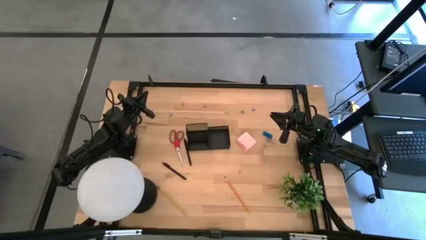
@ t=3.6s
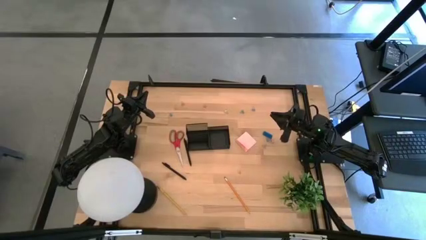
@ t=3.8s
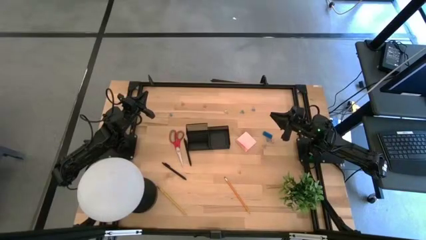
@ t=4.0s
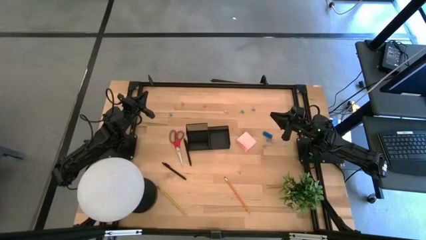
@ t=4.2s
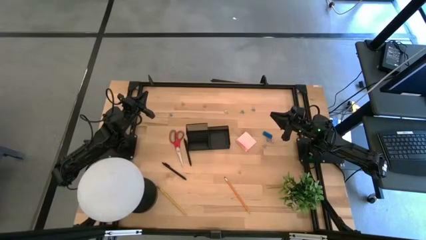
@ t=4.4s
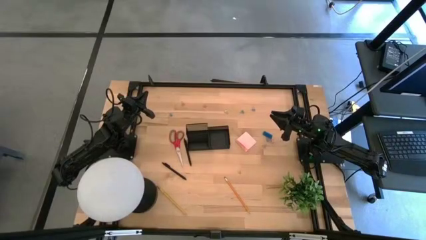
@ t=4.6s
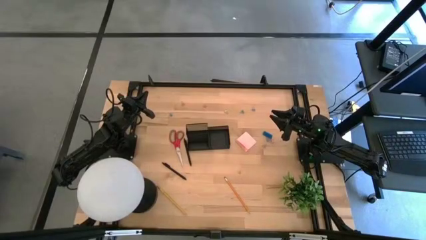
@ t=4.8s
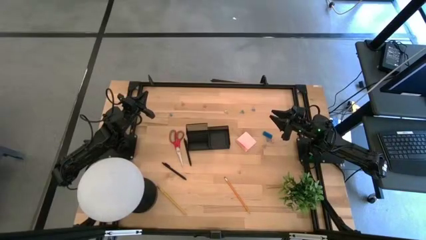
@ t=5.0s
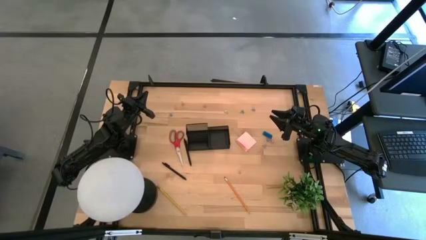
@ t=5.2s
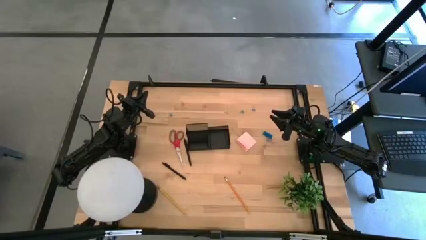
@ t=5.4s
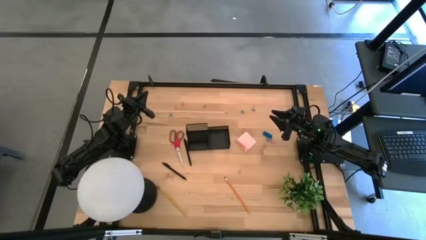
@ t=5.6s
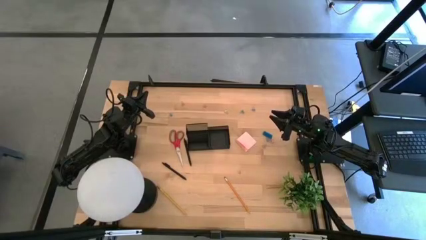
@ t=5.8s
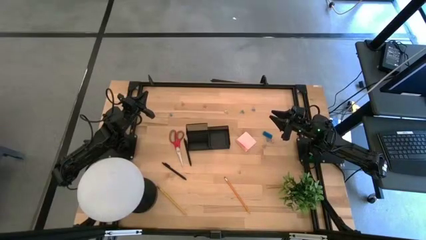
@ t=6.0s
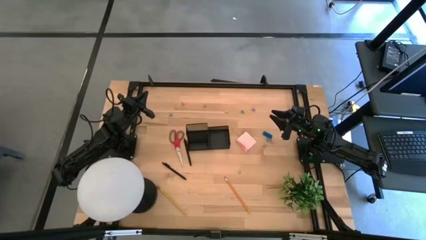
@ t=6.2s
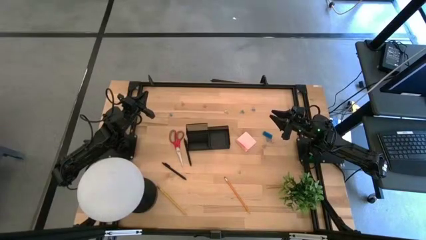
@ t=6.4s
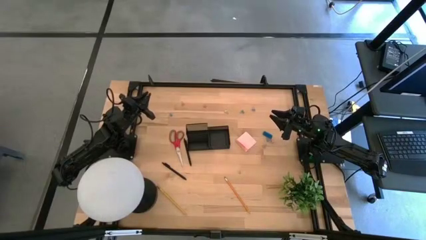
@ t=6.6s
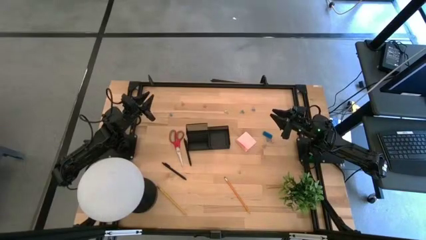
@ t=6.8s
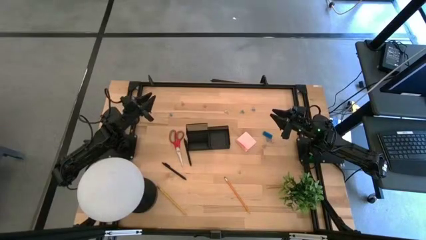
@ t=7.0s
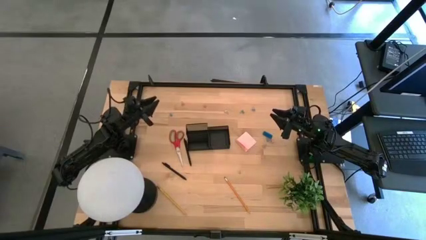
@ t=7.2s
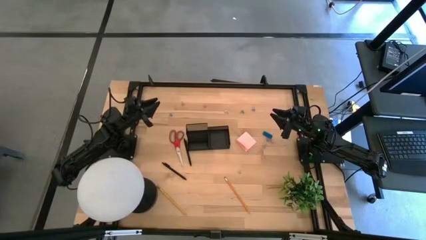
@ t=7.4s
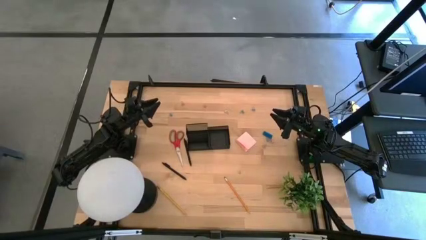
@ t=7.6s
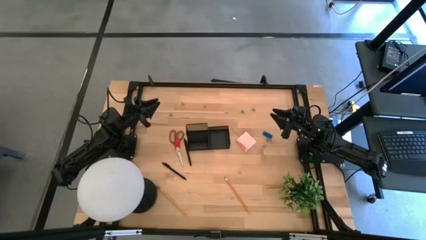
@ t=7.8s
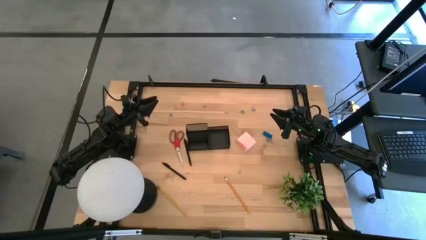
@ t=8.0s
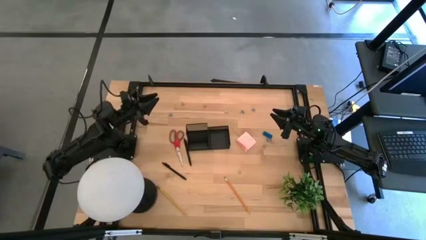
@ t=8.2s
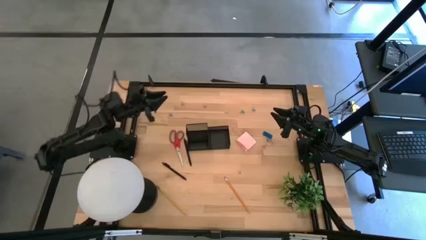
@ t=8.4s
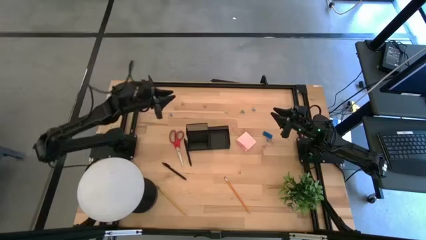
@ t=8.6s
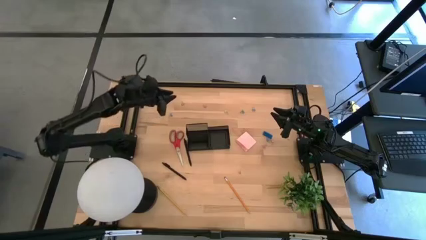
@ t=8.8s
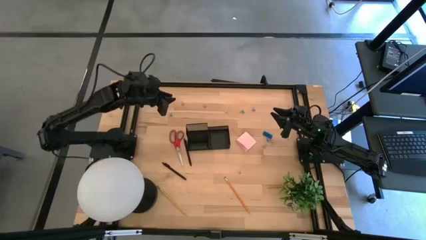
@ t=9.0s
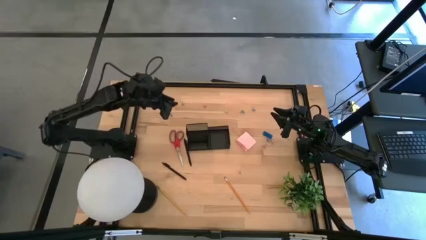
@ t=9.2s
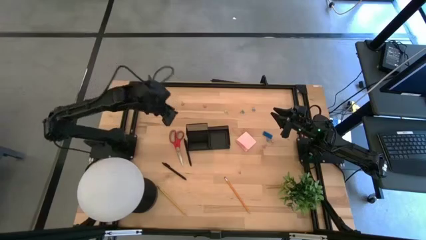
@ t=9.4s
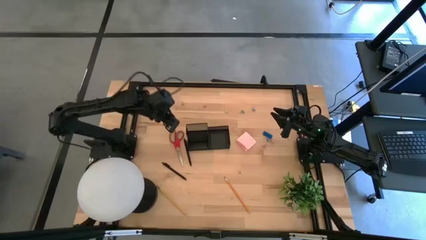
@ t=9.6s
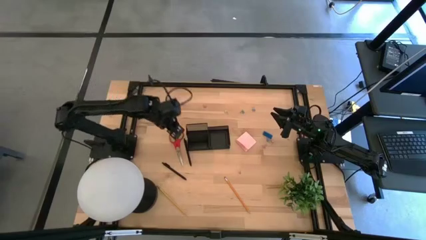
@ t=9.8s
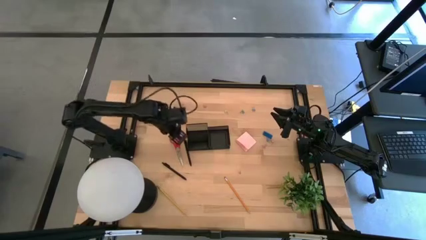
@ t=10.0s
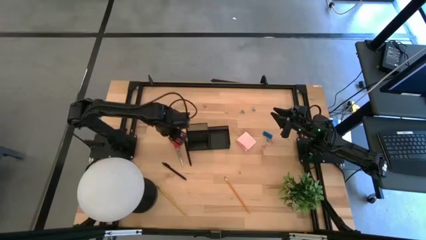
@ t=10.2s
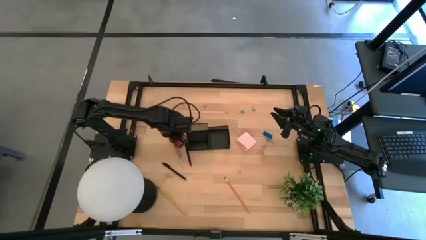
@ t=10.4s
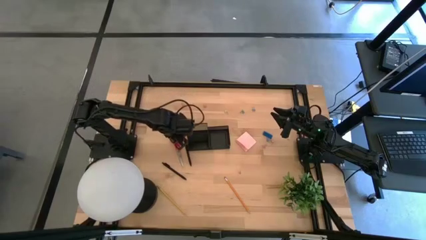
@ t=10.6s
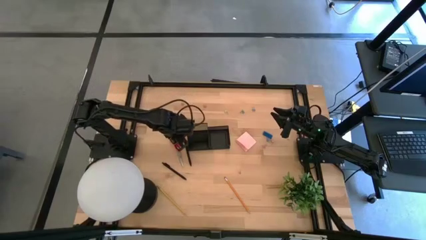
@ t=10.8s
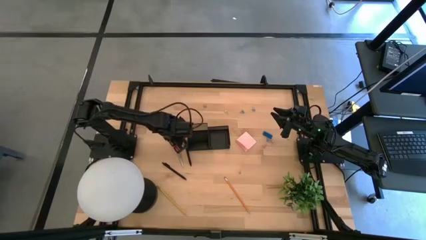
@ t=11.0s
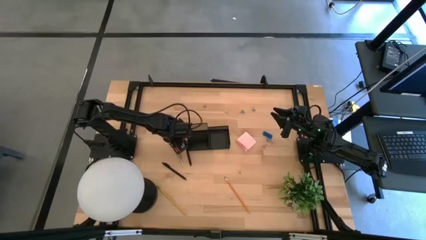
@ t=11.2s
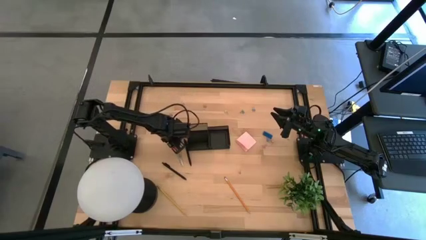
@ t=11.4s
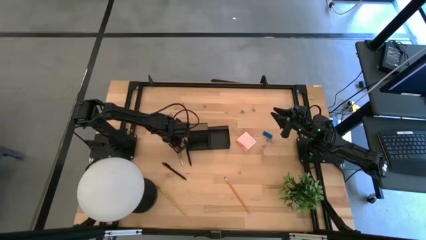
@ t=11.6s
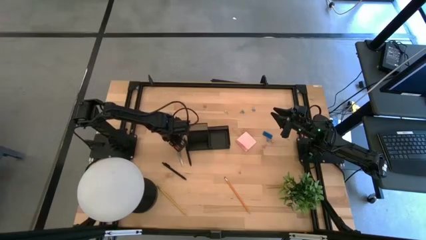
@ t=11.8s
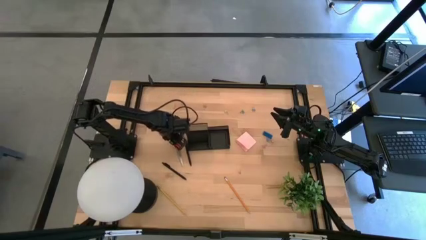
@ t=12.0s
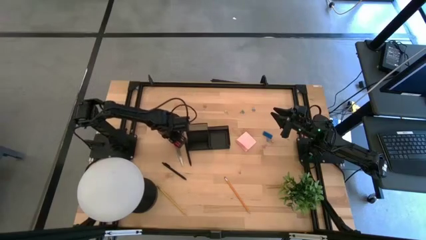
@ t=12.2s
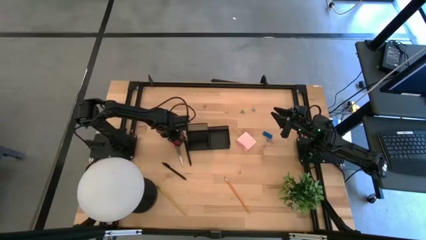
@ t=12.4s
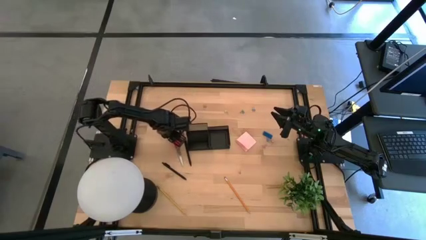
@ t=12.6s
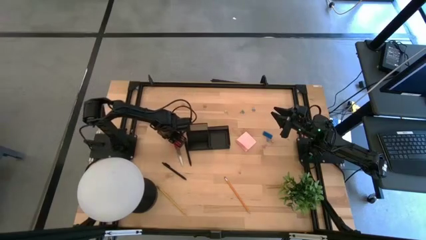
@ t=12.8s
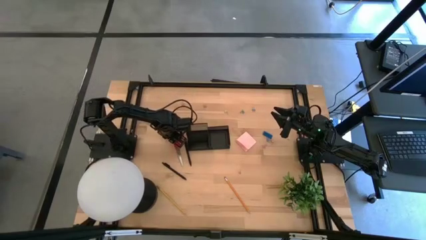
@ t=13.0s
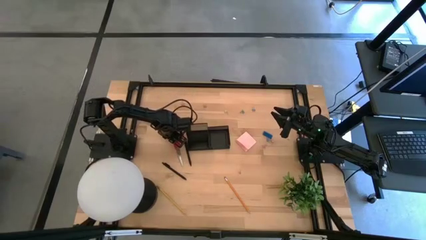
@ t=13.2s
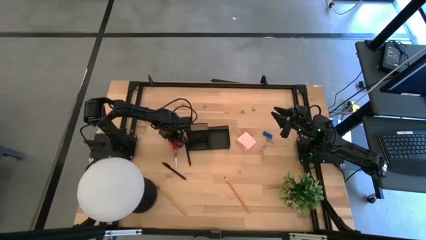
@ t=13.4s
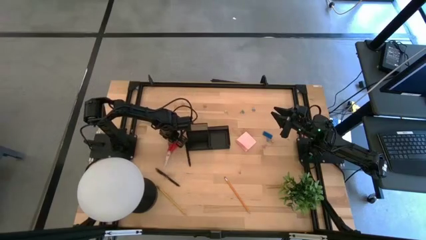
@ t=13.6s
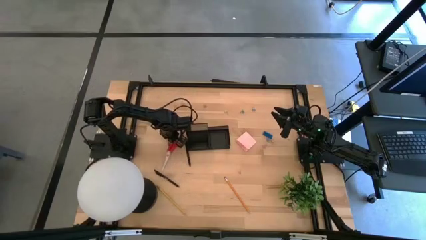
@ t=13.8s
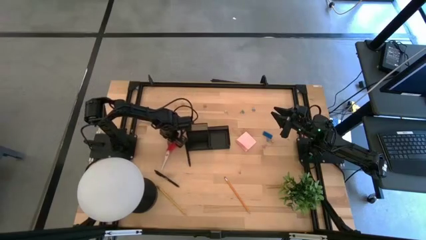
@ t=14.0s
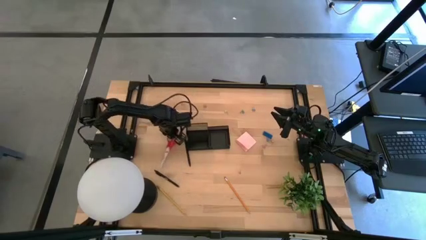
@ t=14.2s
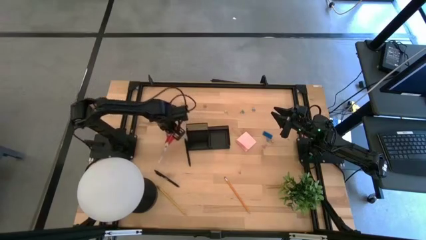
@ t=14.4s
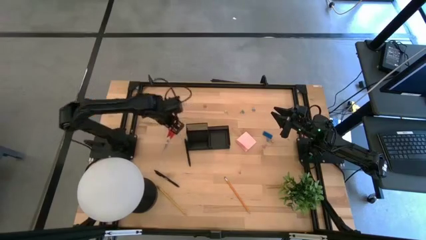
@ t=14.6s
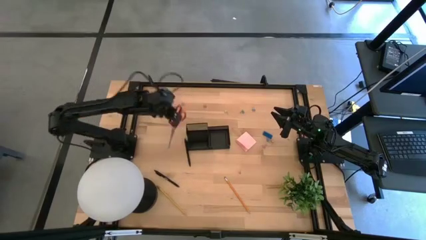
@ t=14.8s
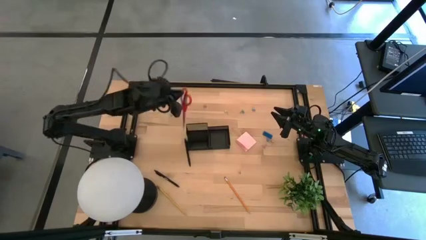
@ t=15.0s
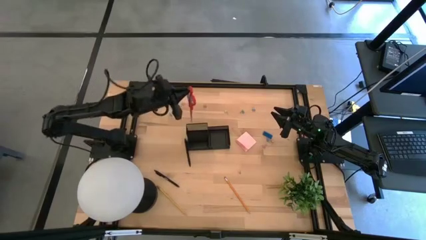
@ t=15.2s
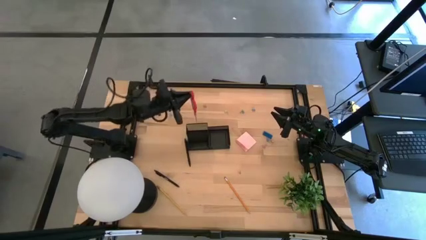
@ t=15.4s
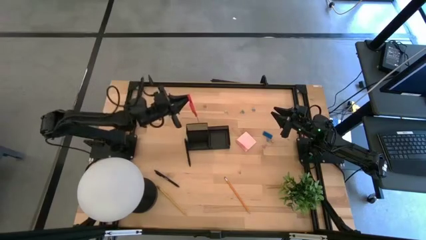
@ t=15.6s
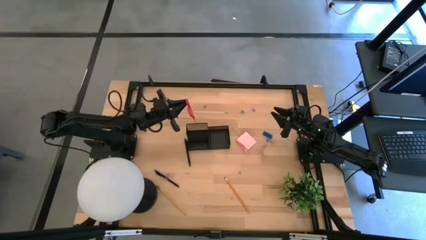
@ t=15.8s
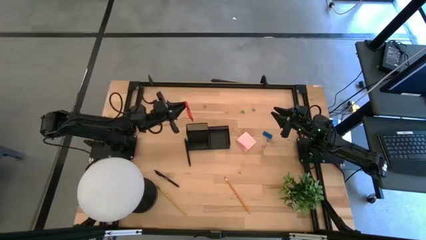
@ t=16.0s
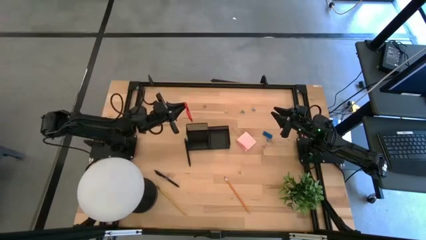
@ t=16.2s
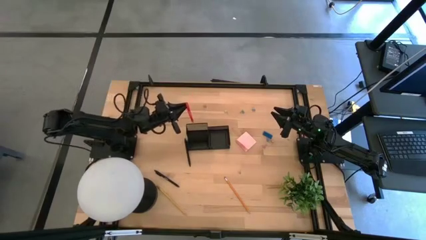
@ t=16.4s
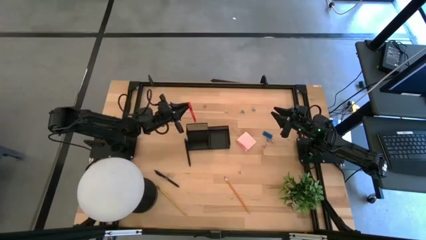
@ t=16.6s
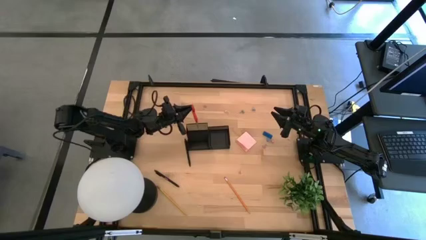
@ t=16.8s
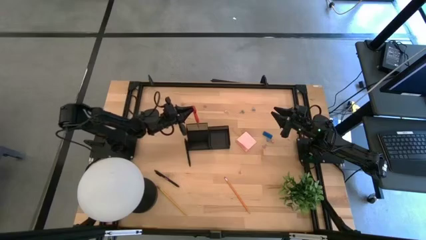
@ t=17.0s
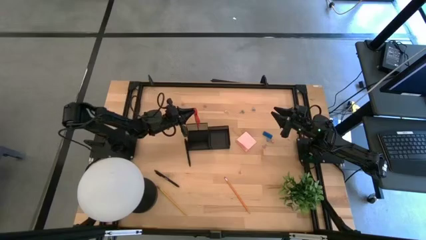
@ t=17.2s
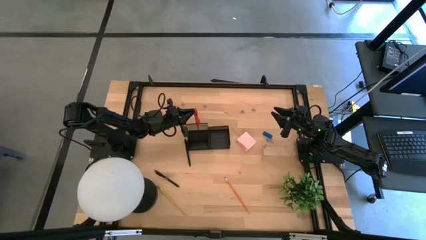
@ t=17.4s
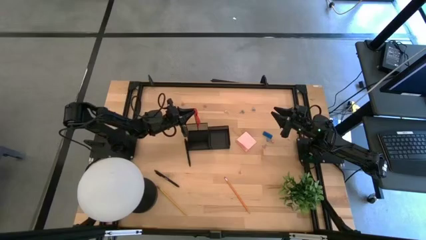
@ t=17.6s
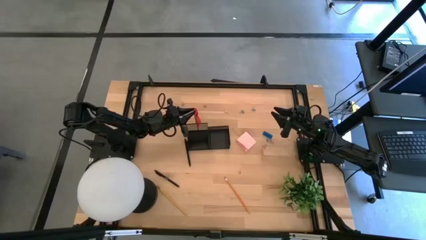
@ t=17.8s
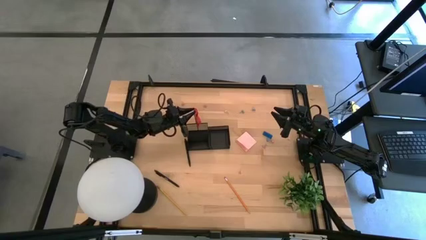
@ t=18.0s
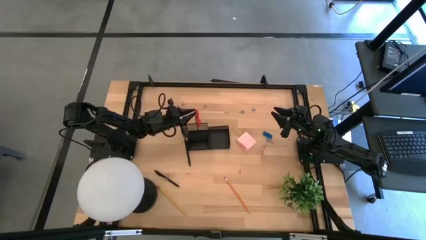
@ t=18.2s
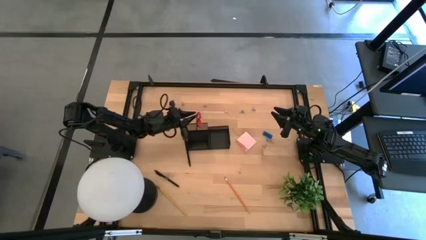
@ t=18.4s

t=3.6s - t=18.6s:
Task: Pick and place office supplies into organizer
Put the red scissors into the desk organizer
